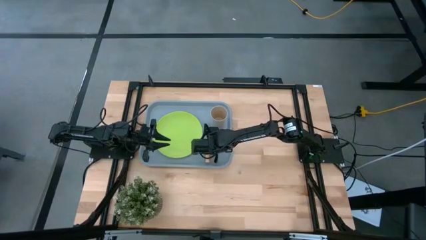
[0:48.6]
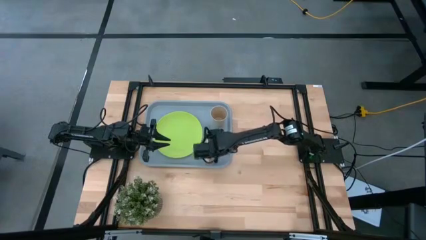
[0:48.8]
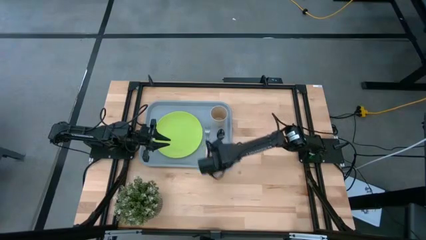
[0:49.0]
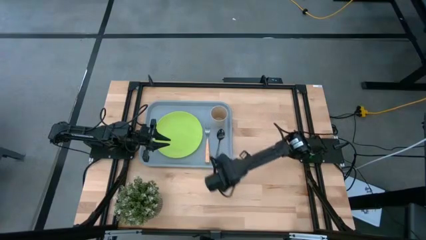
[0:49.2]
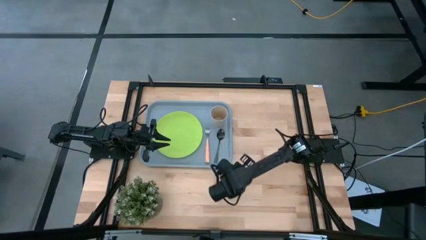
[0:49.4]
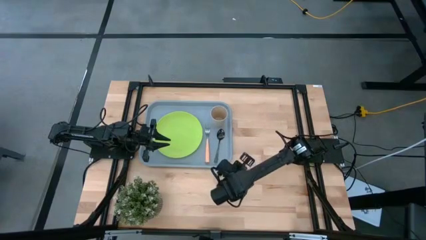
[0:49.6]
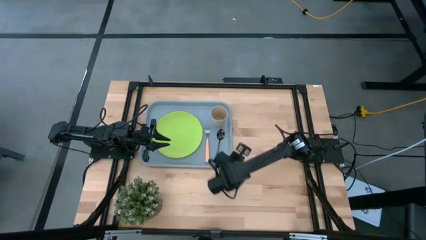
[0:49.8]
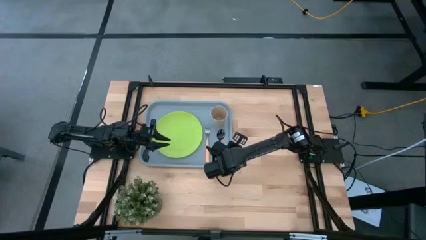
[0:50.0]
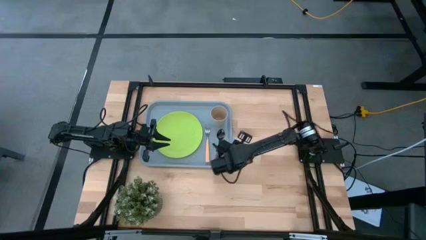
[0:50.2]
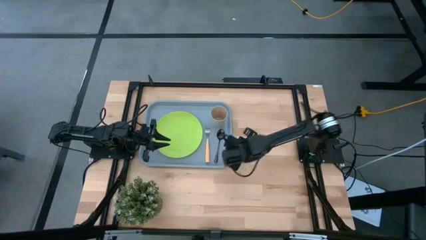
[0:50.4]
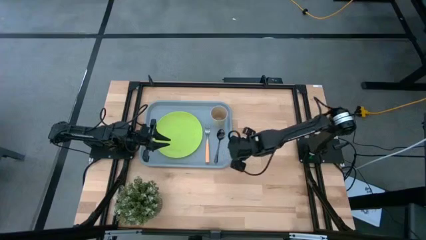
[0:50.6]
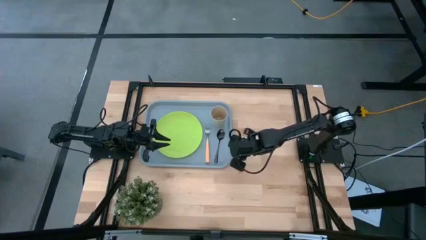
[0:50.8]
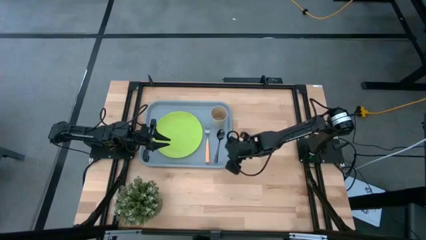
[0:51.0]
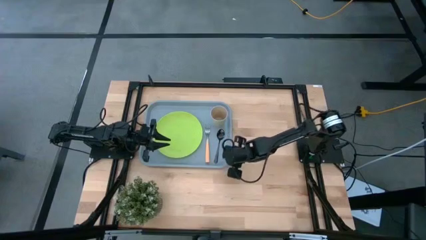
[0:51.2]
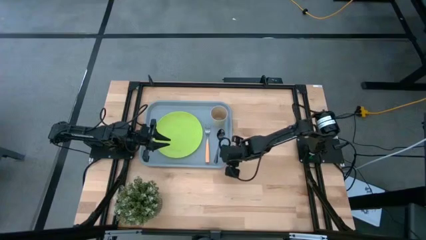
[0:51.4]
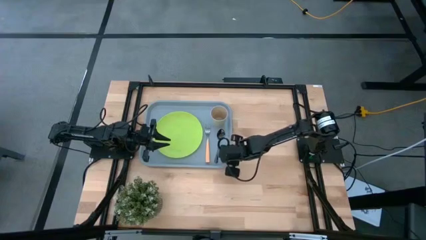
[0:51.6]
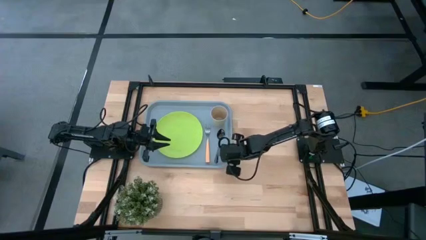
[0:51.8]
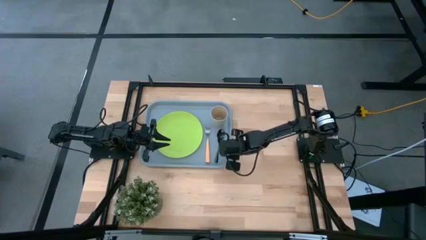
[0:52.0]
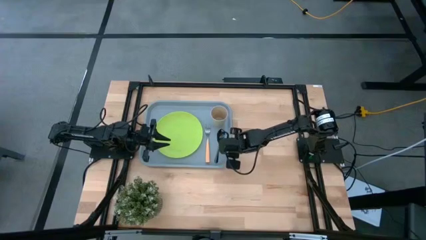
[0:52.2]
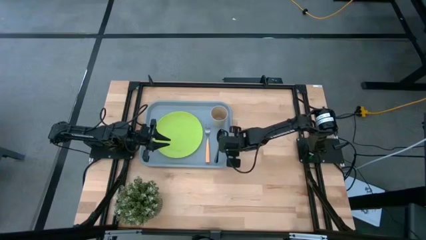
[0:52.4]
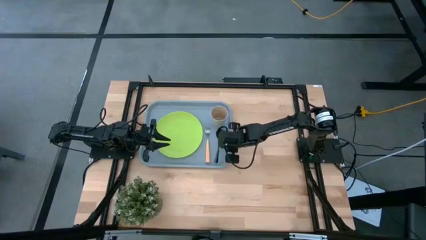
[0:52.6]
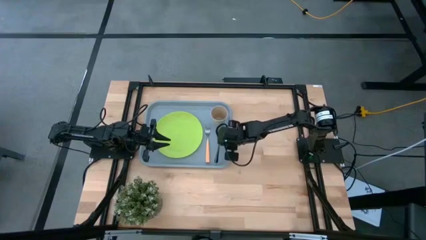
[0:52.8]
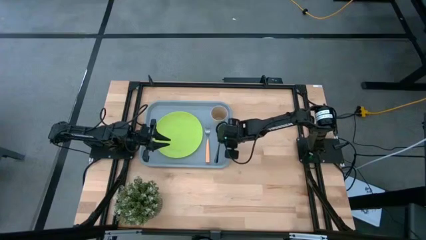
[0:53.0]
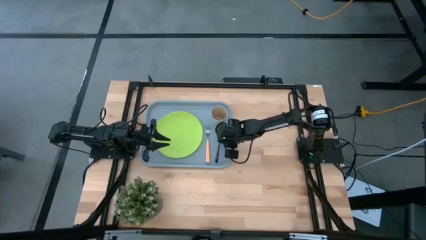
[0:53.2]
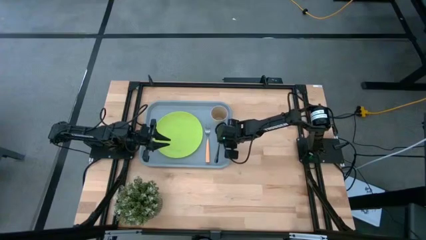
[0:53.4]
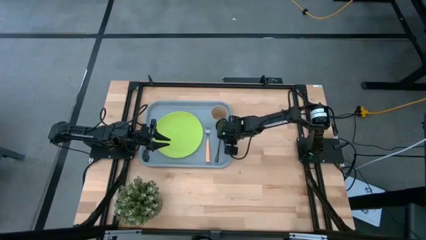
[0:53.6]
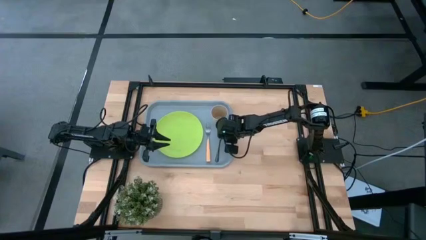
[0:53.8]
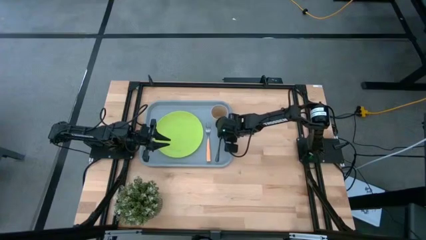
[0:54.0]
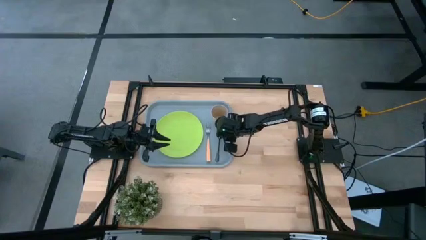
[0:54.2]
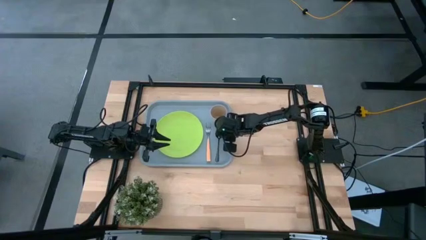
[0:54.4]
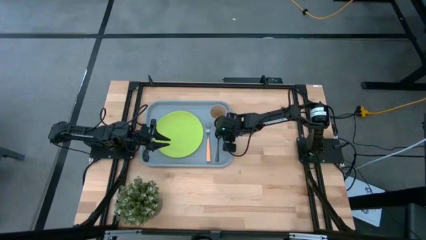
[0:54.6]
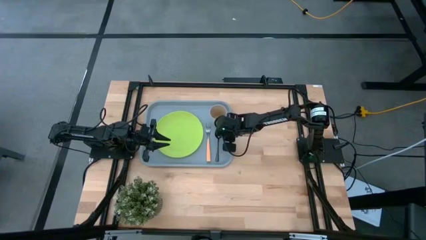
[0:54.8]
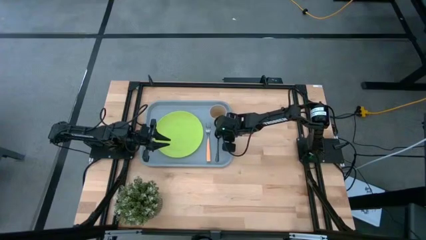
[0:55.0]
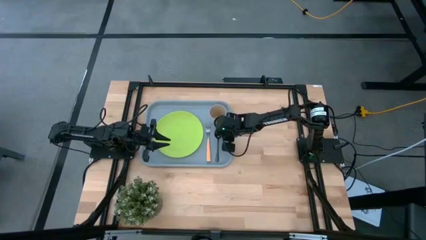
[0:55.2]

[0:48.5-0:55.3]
Task: Pick and place plate/cup/fork/spoon on tray
Adjust the black spoon on the gray tray

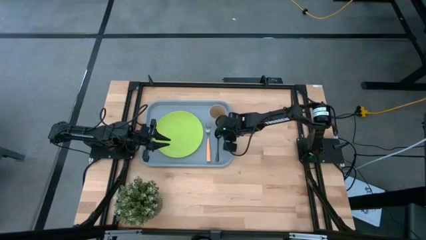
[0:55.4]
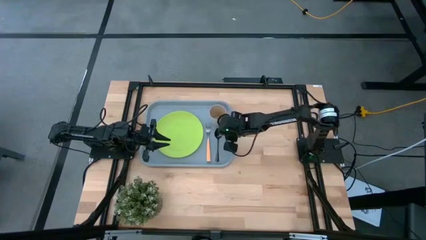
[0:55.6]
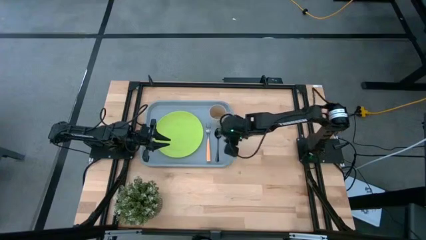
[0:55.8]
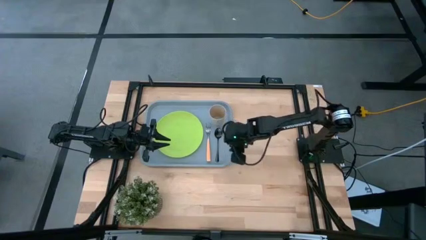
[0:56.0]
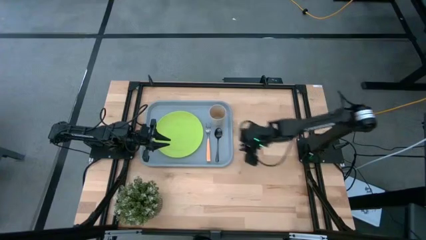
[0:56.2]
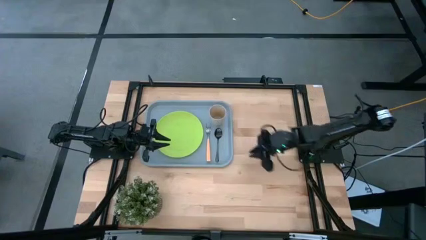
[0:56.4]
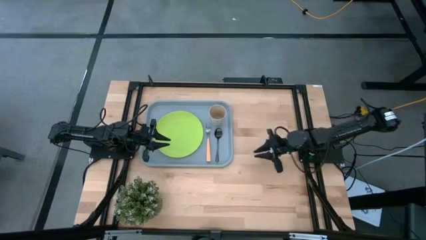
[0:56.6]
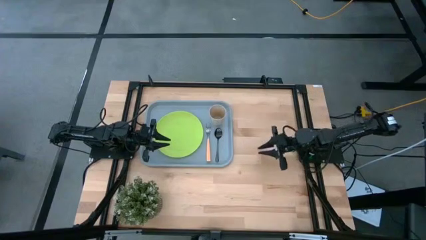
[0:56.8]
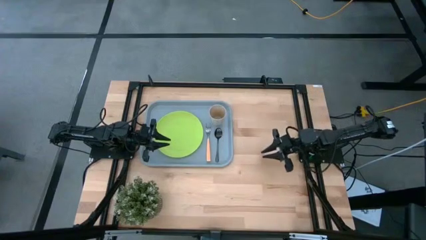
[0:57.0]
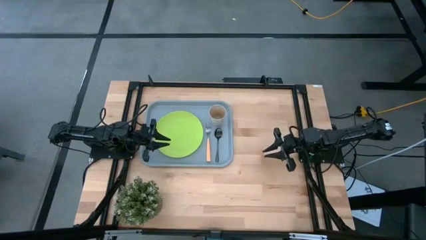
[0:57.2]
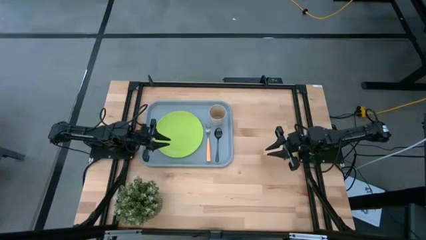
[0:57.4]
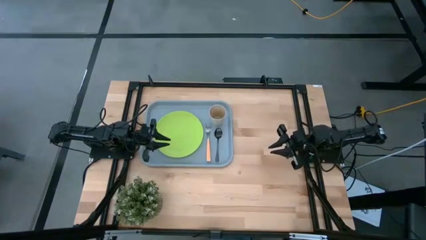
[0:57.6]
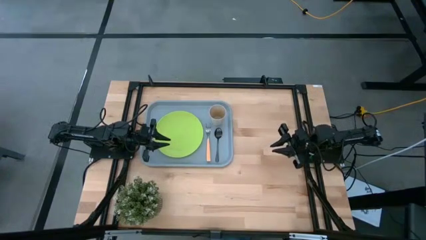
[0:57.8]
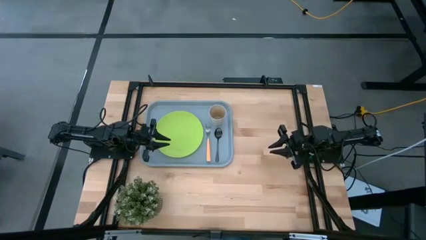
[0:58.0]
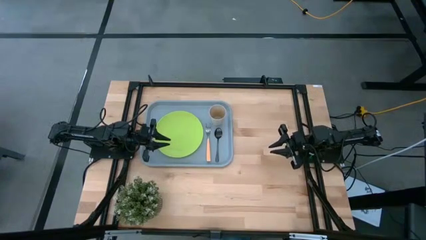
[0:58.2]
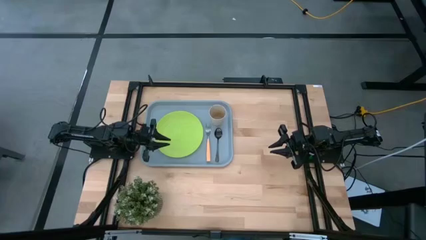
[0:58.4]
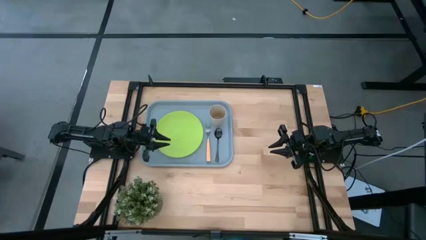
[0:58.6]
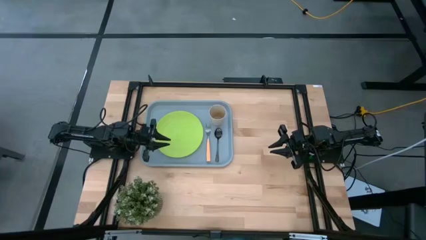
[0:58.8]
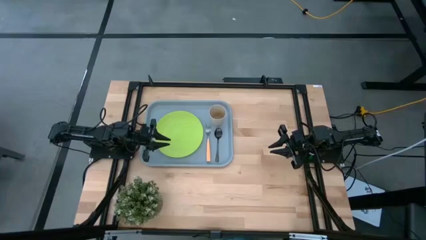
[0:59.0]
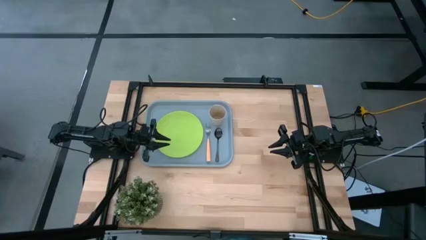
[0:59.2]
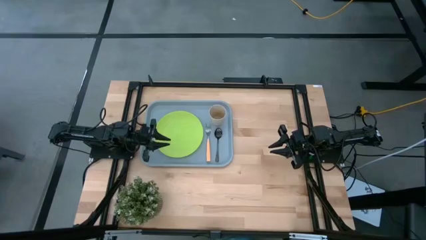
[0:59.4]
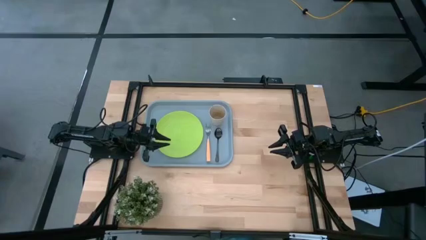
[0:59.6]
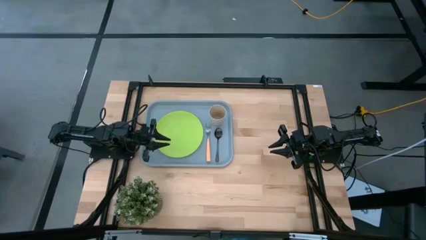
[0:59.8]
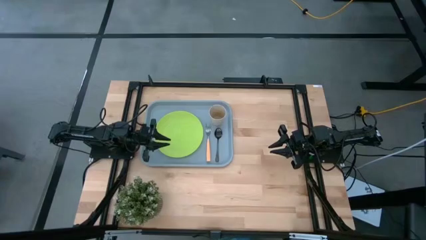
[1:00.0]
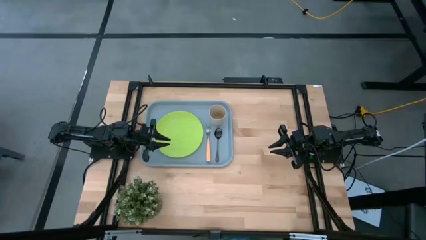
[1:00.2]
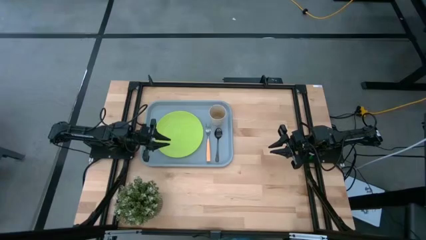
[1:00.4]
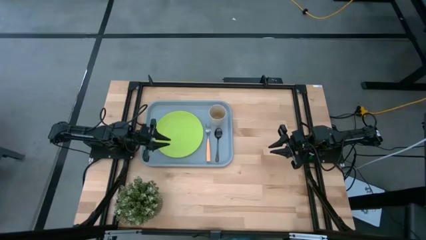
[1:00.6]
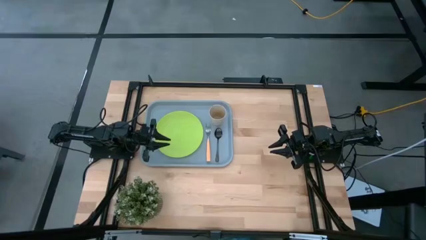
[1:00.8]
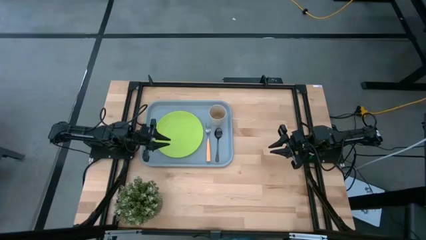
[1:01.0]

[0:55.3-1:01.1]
Return to Home Position

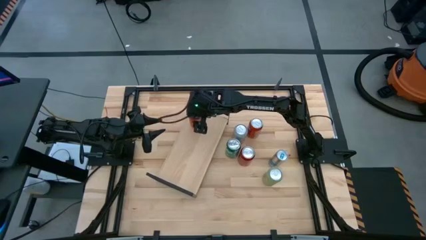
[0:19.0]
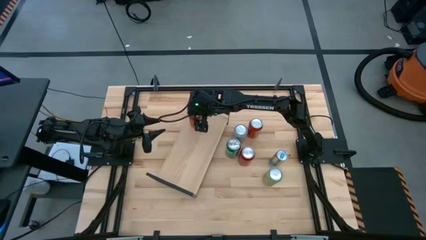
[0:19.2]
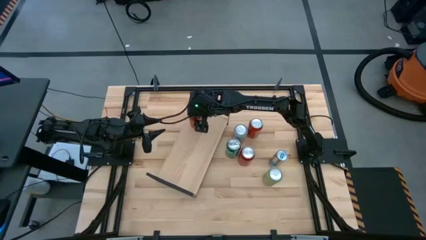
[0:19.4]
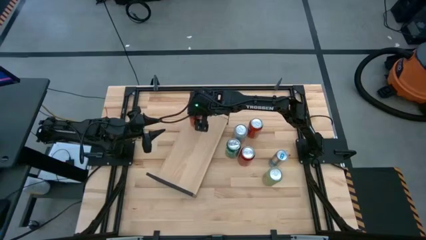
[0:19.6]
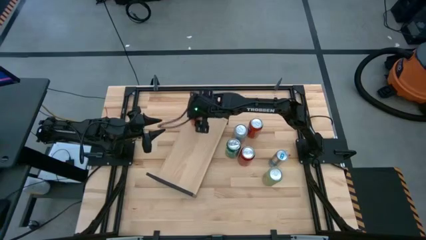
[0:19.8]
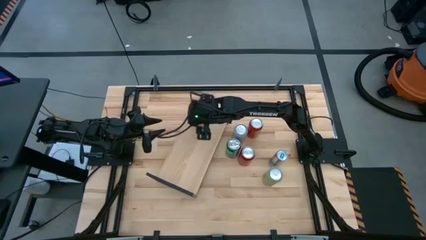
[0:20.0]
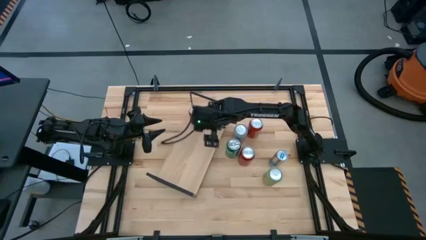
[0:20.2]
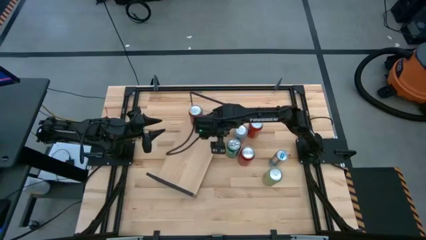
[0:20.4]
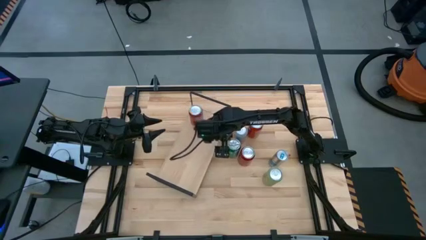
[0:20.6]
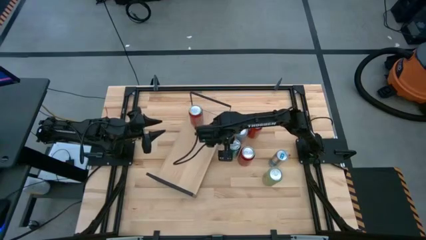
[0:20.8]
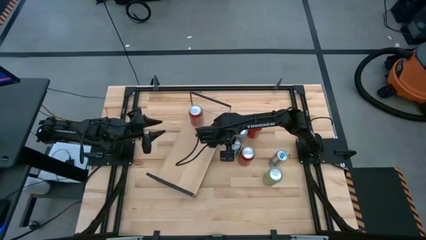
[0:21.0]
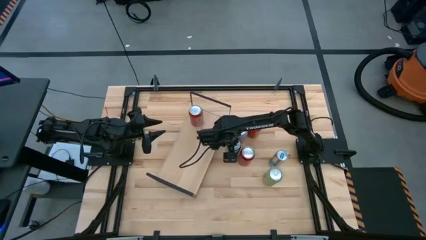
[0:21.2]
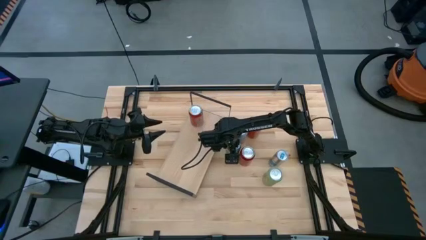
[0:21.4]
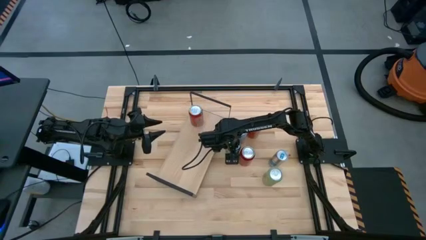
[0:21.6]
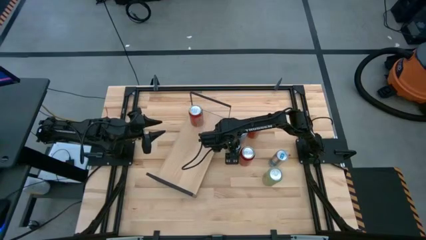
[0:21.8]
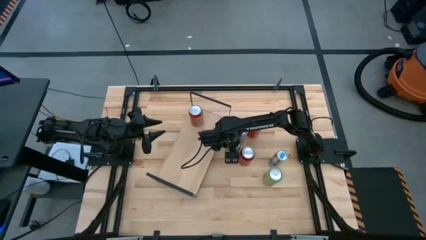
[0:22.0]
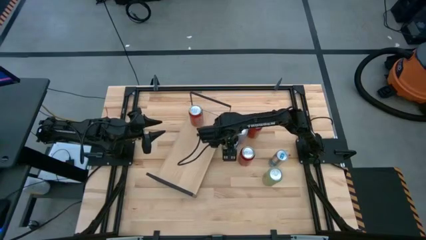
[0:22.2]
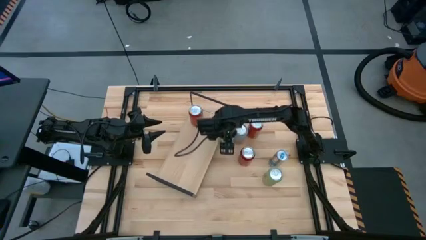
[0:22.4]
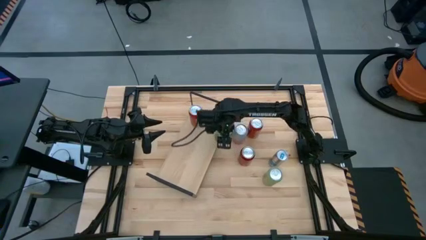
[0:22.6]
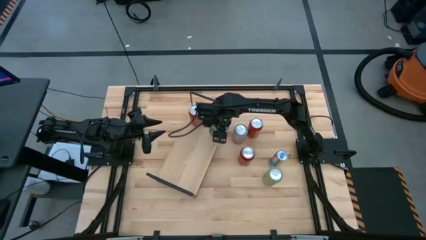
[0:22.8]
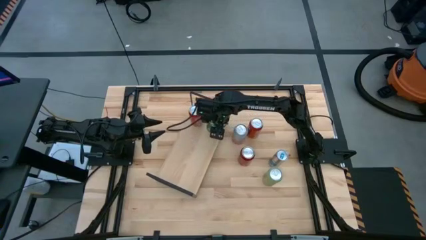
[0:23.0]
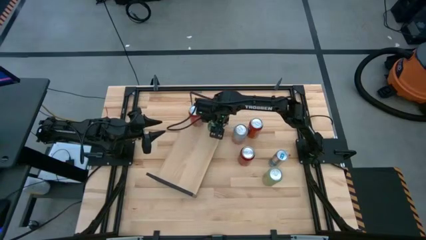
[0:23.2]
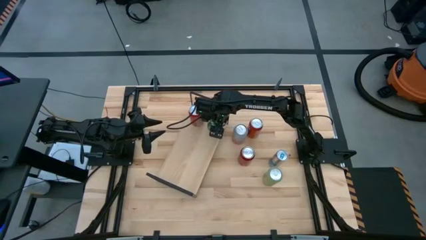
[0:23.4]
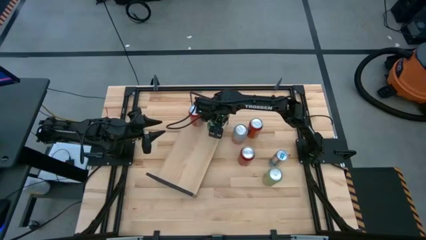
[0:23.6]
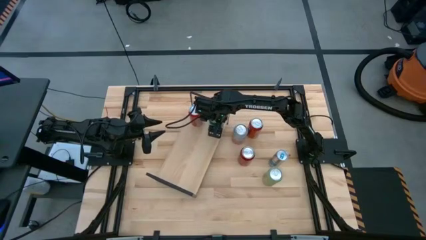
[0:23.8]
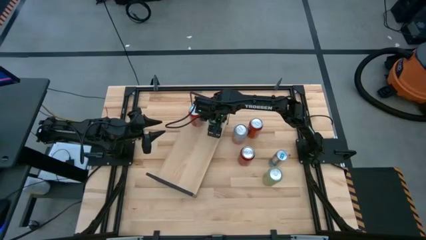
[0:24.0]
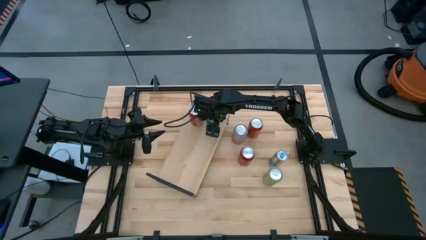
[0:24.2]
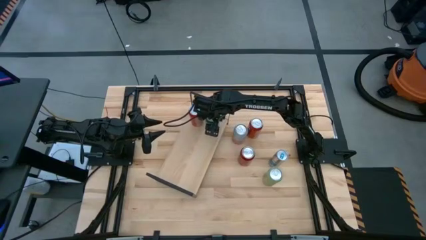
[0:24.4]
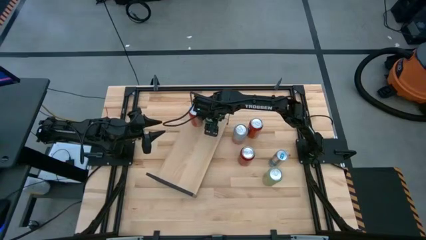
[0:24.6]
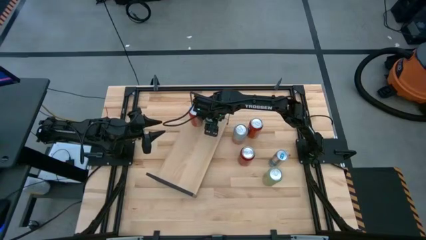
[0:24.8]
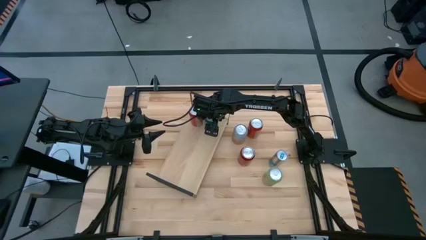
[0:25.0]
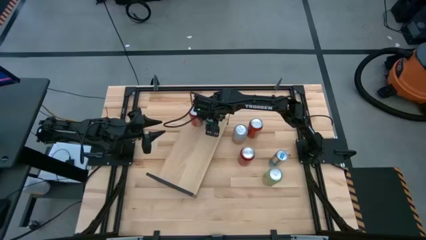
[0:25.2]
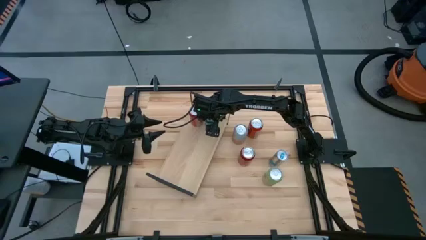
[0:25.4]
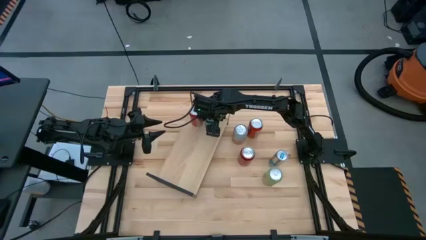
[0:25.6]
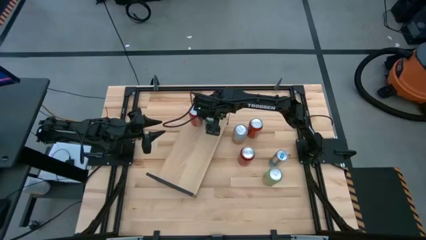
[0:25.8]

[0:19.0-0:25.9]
Task: Place canned beverage on shelf
Put the green soda can on the shelf
